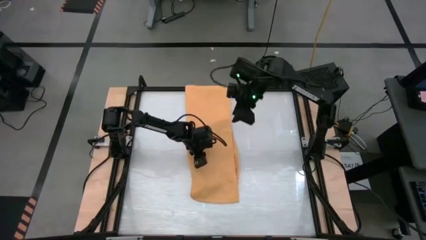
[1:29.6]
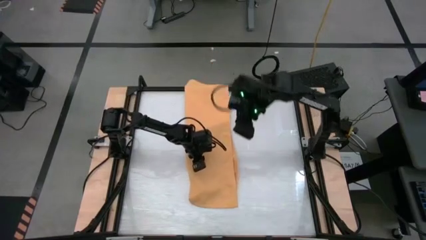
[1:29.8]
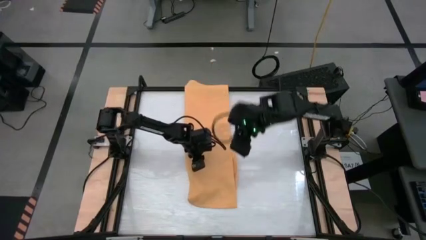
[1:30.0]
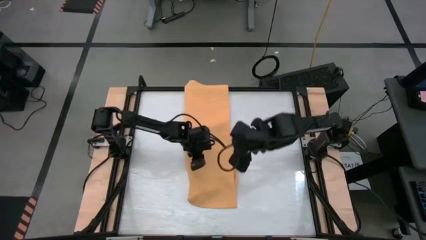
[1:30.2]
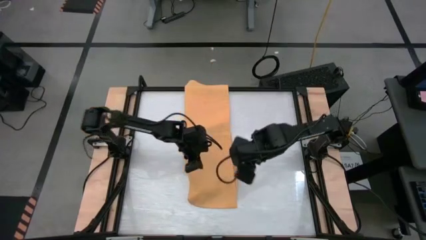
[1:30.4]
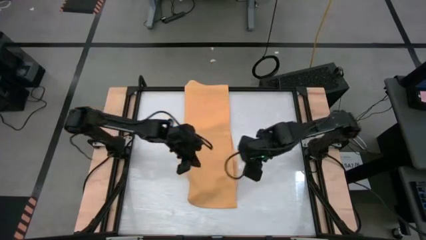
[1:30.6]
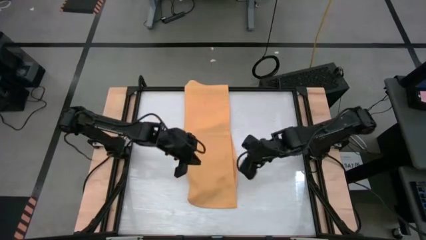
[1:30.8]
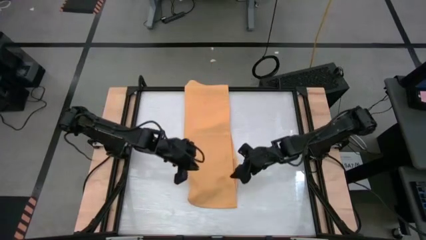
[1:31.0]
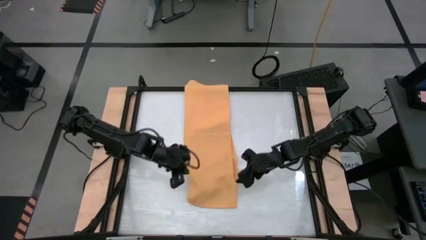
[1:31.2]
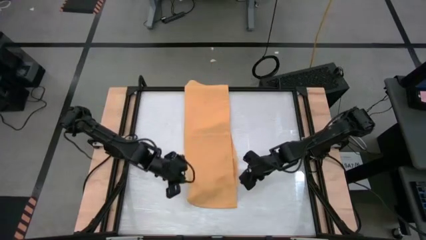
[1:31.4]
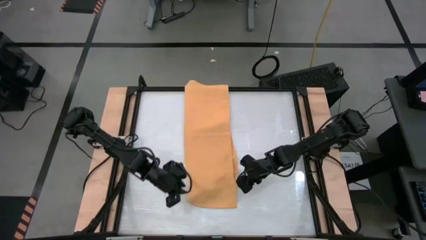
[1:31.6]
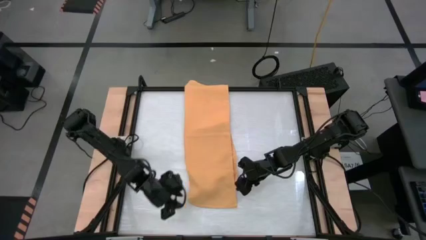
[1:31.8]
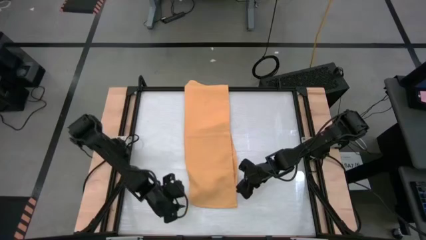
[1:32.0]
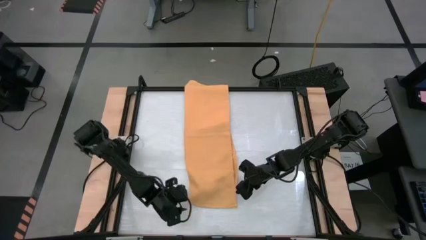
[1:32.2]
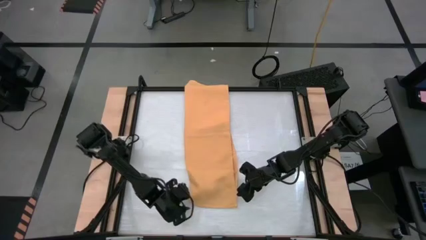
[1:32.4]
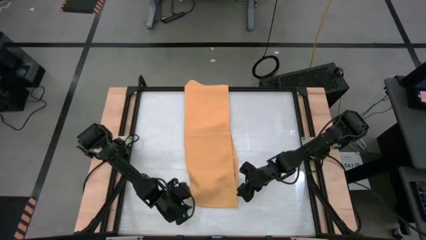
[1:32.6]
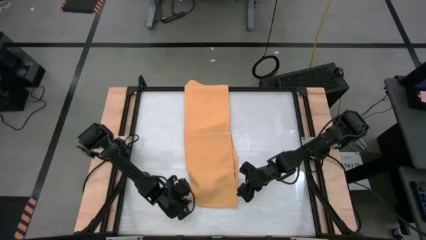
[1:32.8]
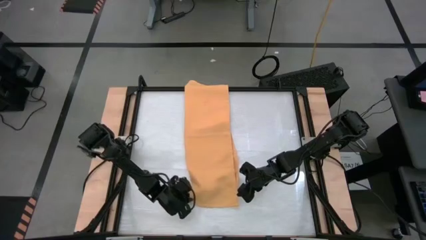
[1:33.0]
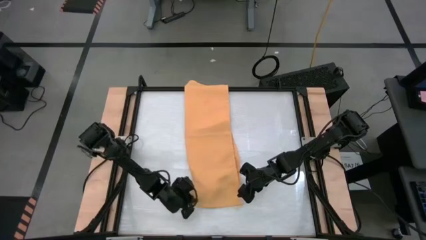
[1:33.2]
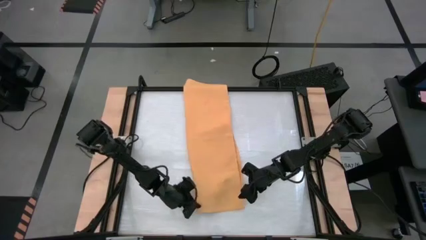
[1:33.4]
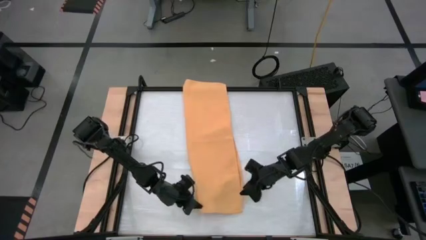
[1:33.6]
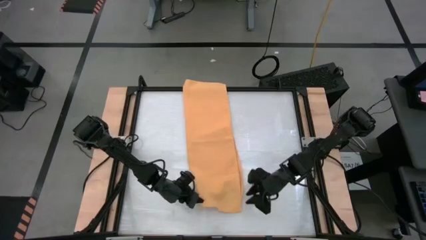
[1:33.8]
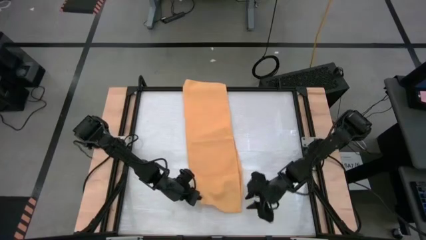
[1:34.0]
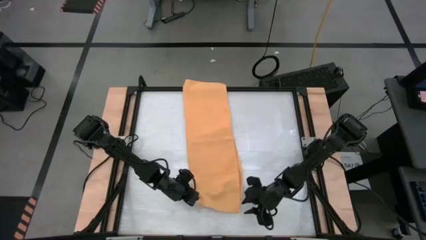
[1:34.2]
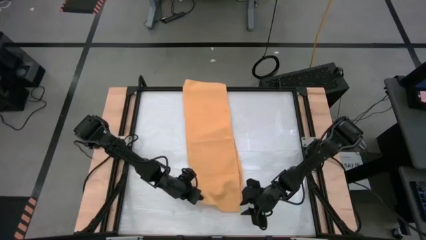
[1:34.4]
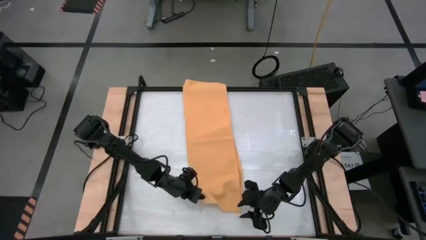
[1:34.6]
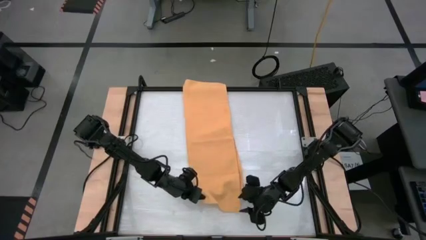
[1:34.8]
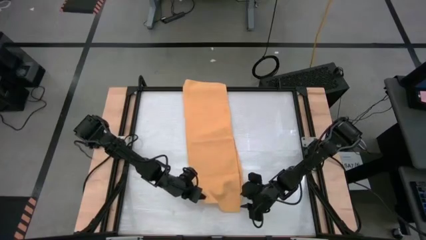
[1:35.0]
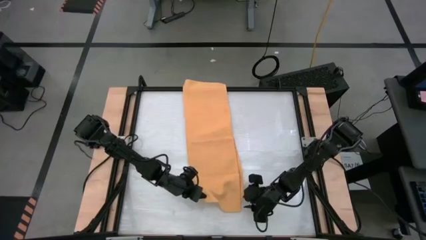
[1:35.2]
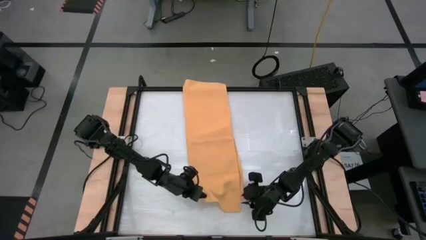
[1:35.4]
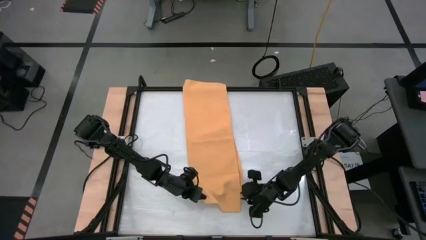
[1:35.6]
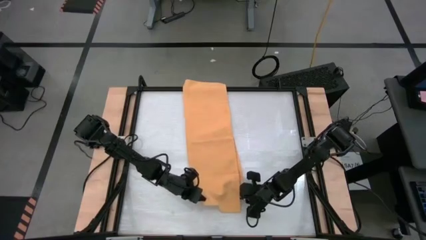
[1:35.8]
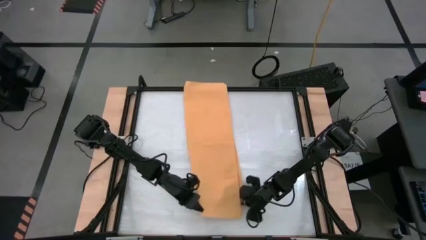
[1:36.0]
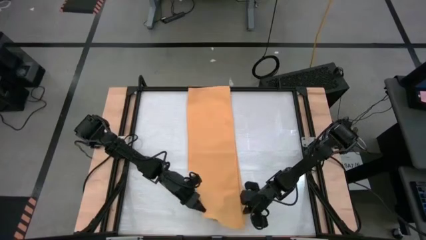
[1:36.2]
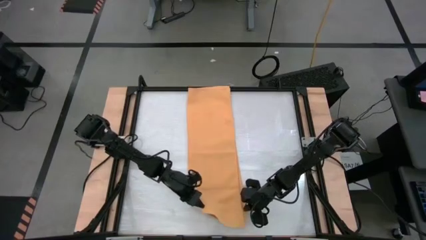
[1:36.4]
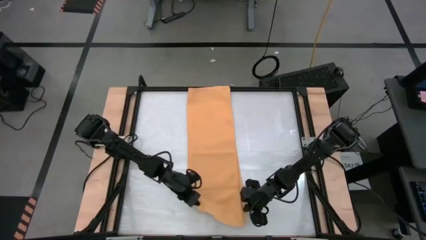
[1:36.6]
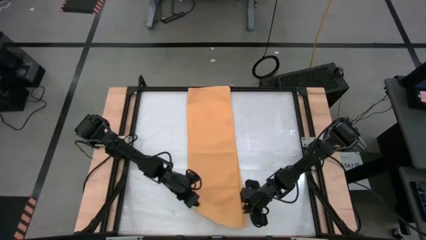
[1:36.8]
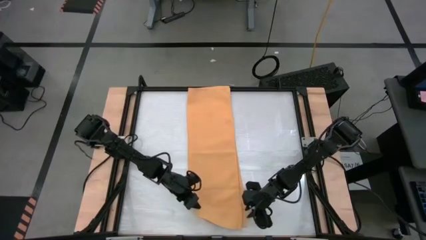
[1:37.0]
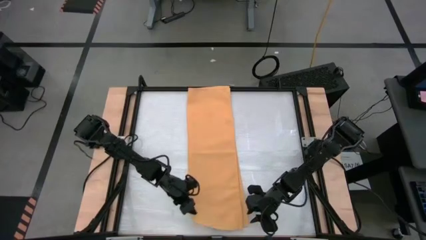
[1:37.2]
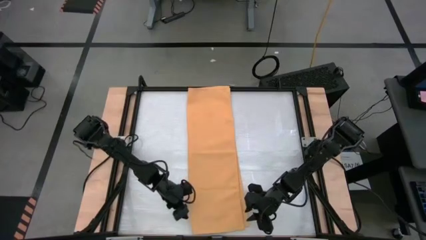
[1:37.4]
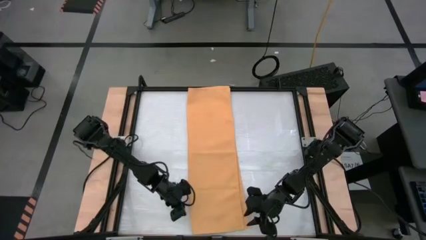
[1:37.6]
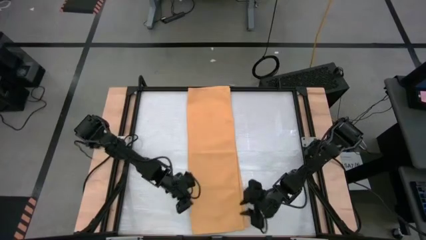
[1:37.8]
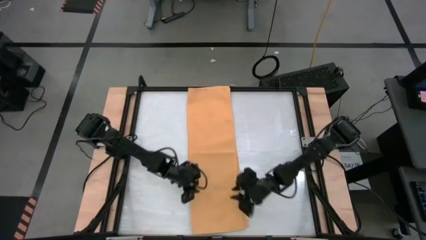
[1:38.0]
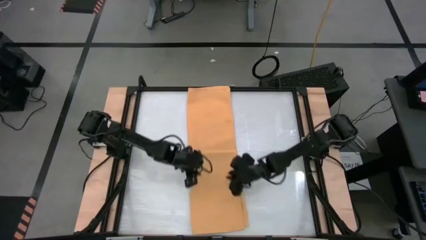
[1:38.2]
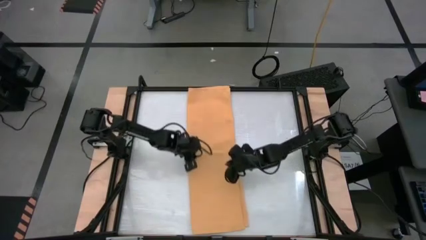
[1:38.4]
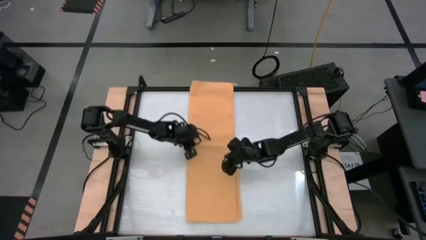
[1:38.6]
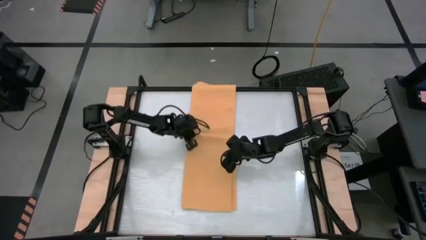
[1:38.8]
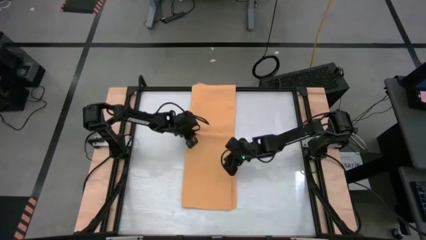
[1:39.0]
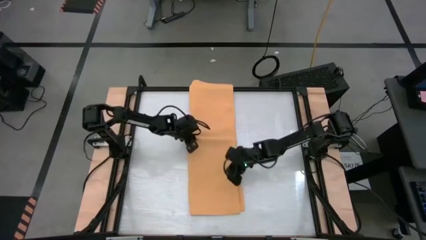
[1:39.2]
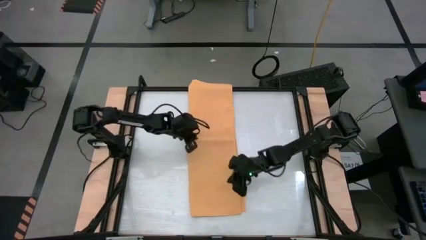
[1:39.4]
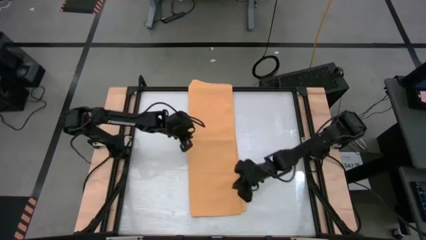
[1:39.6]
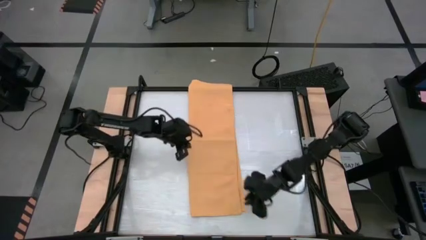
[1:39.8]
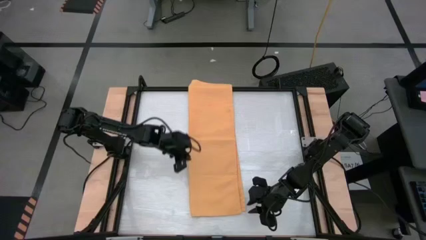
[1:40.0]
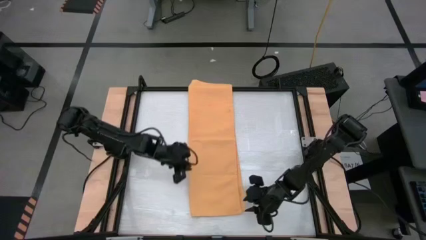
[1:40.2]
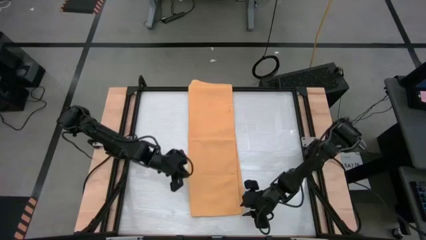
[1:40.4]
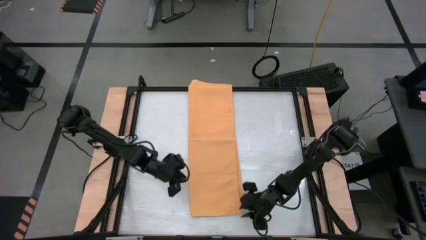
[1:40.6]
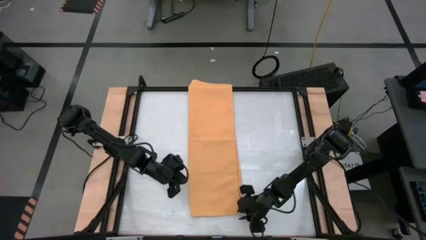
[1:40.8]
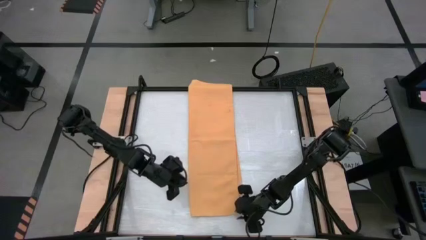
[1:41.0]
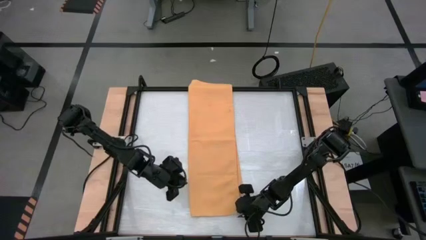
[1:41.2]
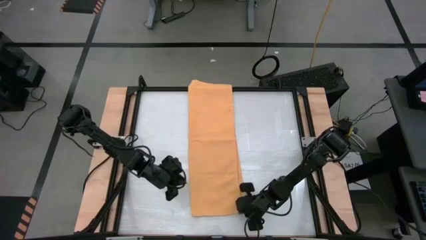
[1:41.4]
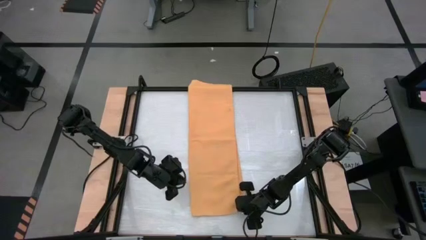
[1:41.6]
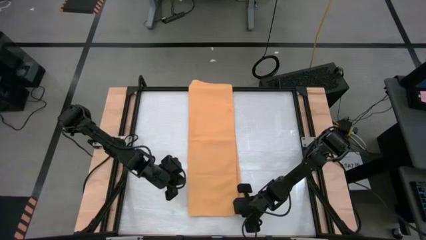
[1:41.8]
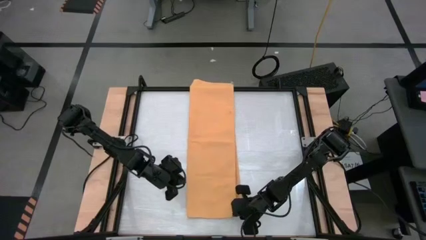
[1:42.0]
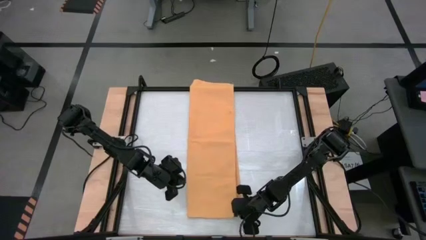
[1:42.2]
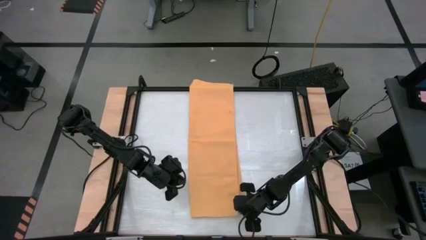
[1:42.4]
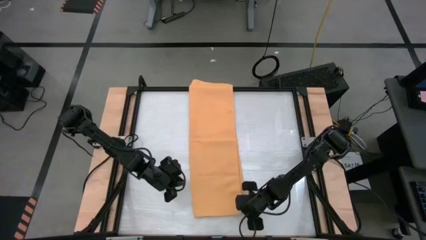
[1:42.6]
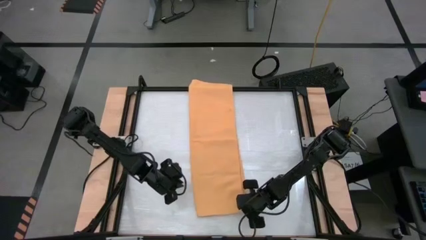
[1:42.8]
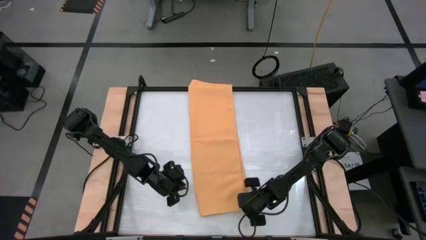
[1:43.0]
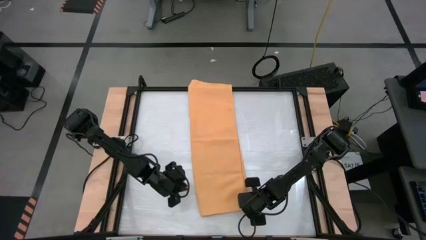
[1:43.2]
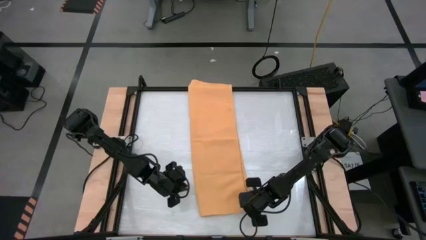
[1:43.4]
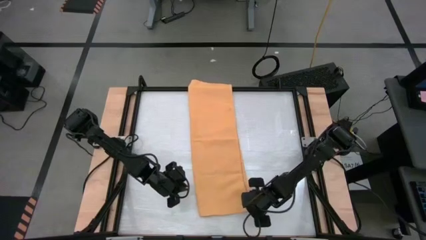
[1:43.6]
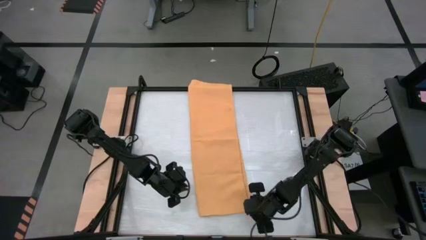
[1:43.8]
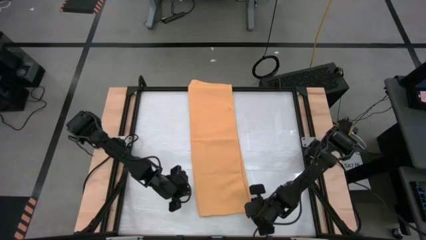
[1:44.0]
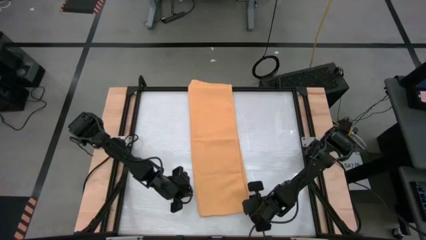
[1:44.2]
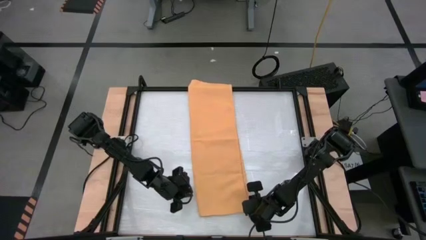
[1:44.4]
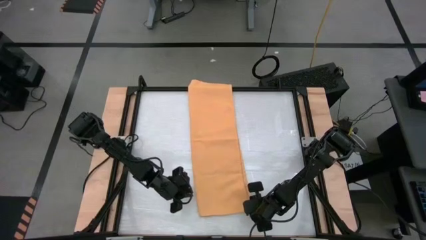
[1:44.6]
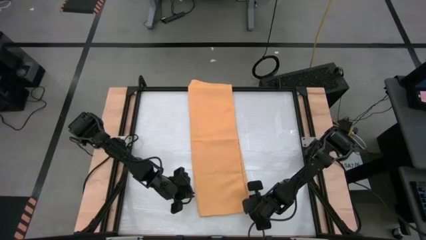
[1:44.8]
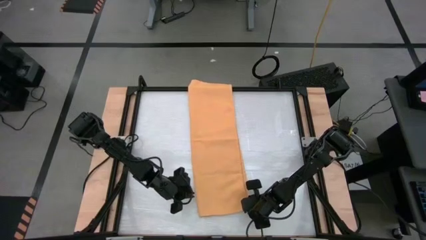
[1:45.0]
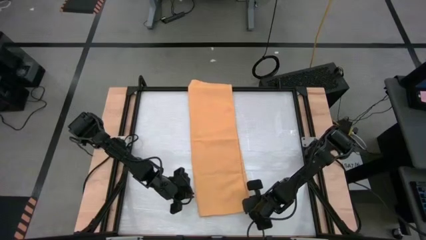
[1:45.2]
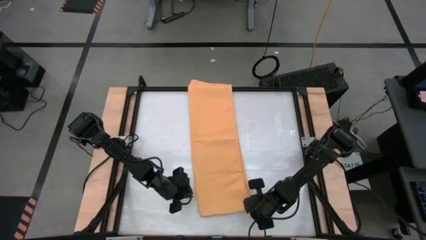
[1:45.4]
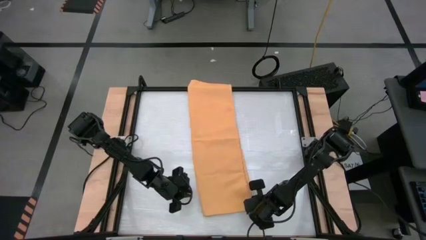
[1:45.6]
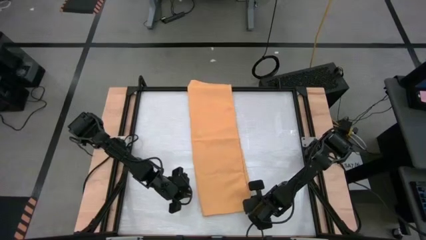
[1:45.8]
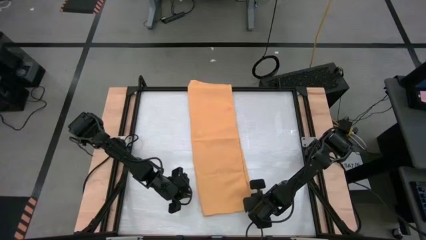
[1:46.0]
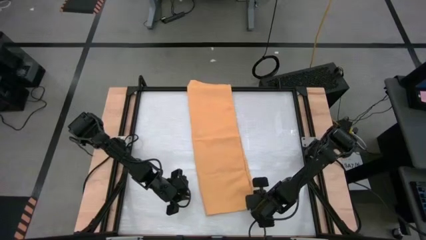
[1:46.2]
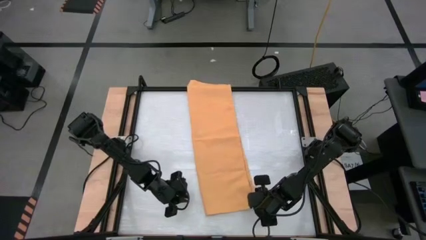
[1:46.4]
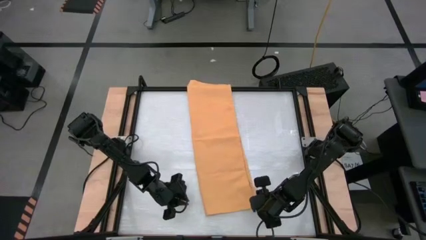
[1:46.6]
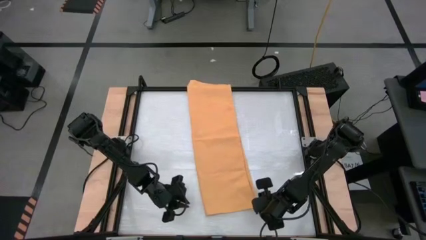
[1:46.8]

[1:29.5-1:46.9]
Task: Roll towel into tight, uniform cylinder
Roll the yellow towel
